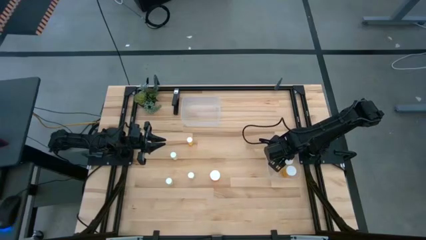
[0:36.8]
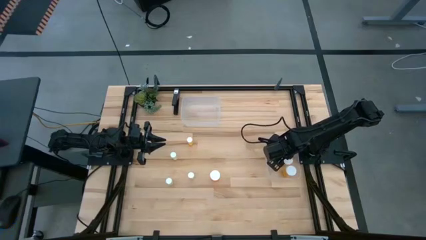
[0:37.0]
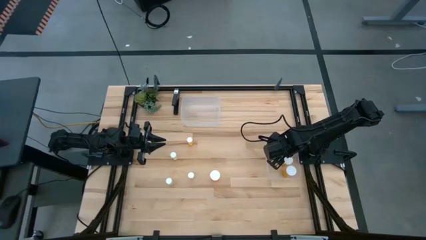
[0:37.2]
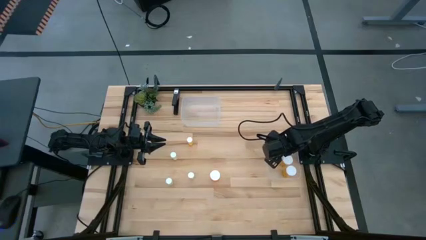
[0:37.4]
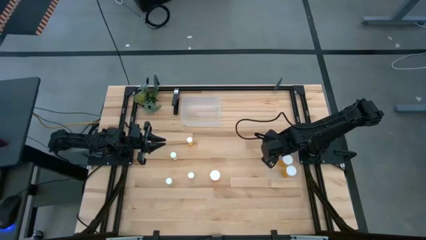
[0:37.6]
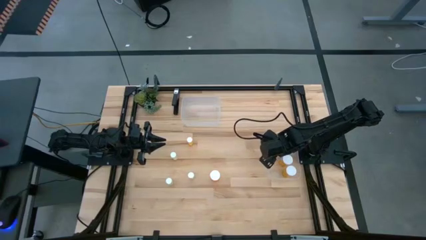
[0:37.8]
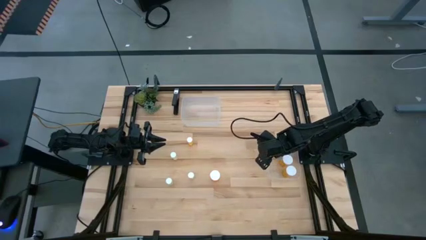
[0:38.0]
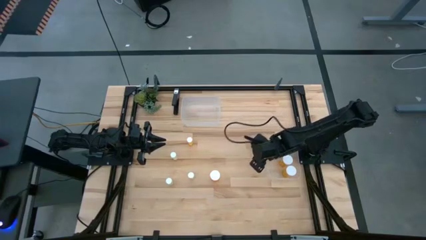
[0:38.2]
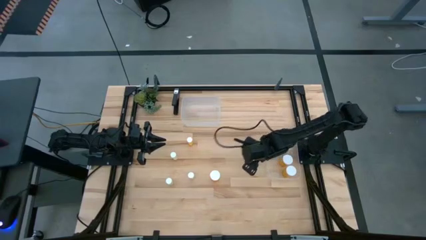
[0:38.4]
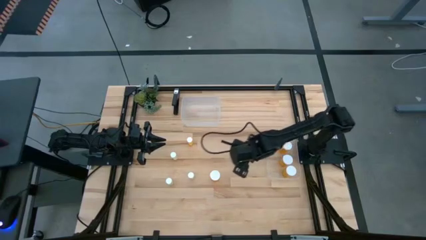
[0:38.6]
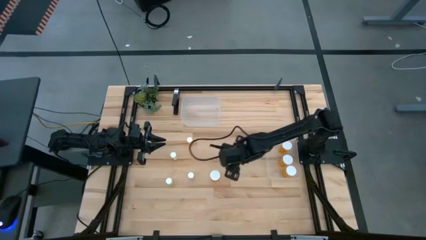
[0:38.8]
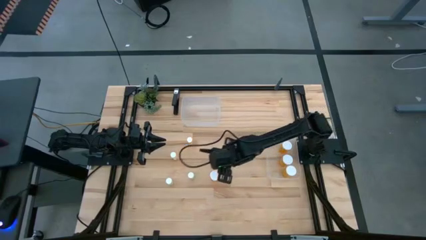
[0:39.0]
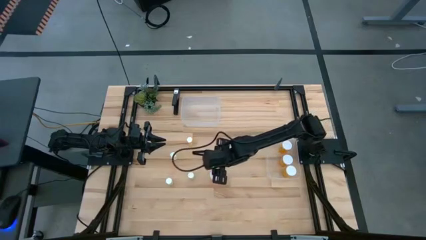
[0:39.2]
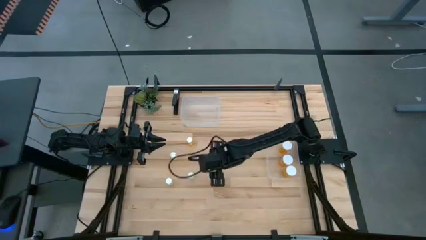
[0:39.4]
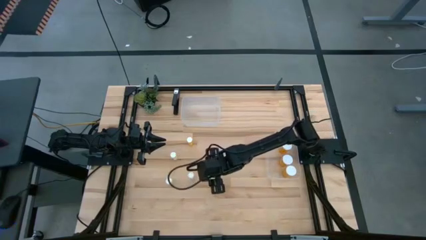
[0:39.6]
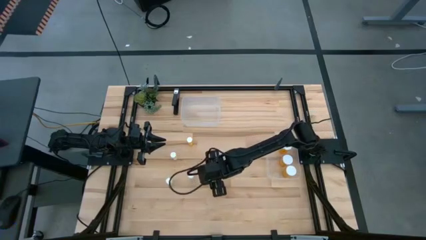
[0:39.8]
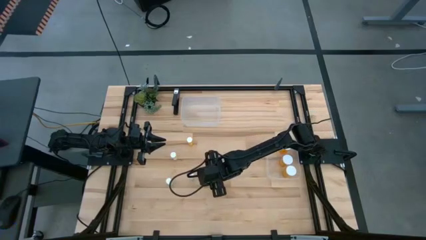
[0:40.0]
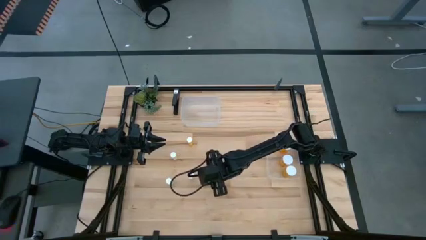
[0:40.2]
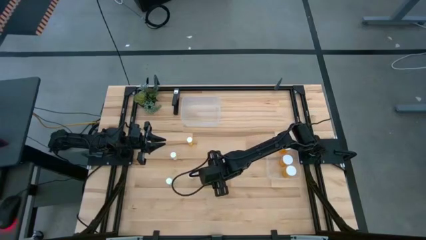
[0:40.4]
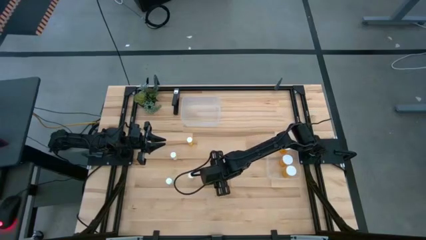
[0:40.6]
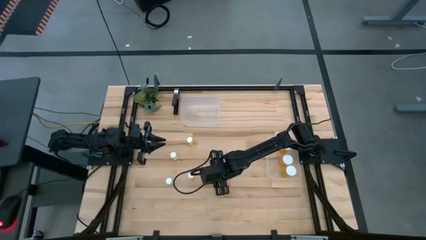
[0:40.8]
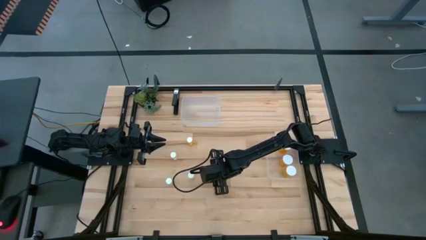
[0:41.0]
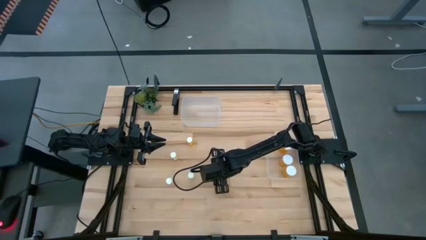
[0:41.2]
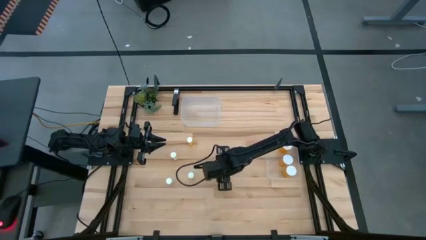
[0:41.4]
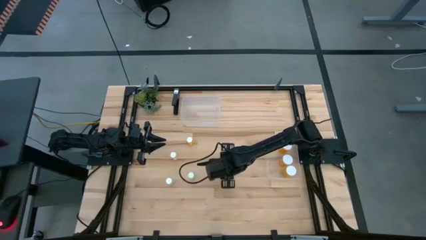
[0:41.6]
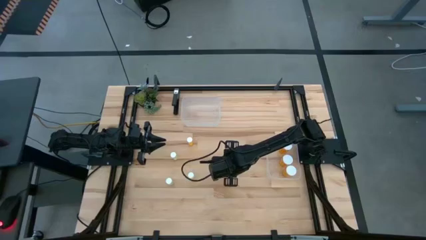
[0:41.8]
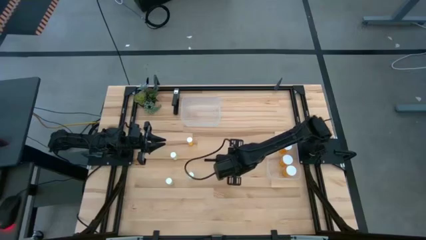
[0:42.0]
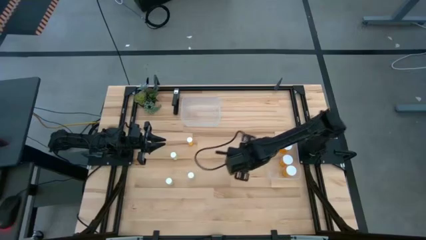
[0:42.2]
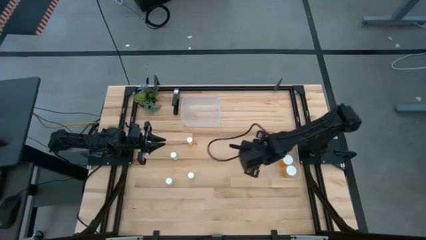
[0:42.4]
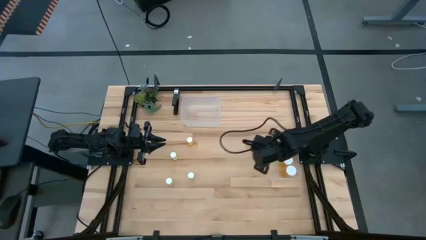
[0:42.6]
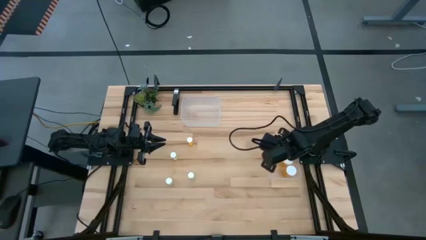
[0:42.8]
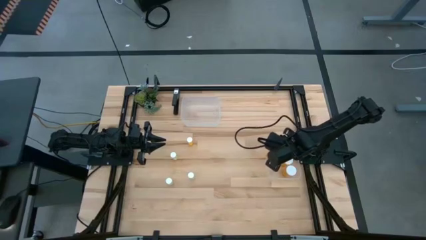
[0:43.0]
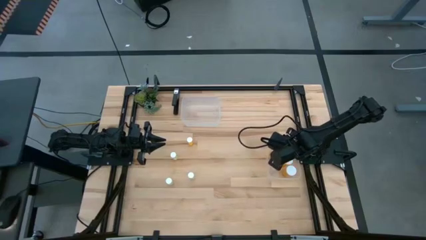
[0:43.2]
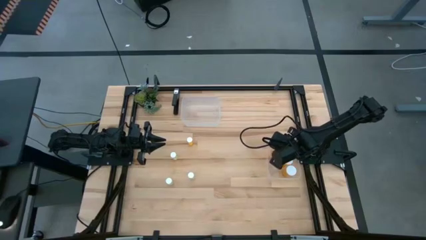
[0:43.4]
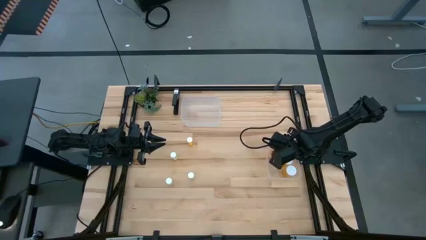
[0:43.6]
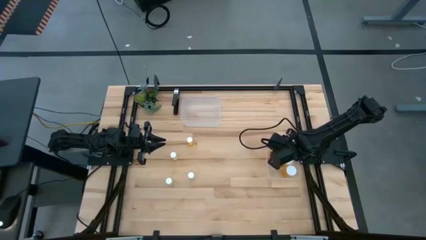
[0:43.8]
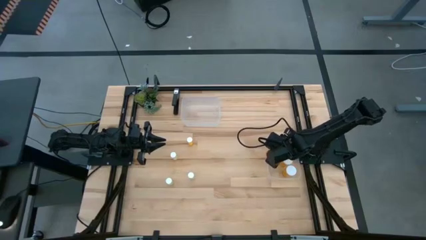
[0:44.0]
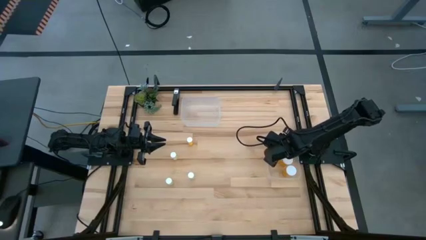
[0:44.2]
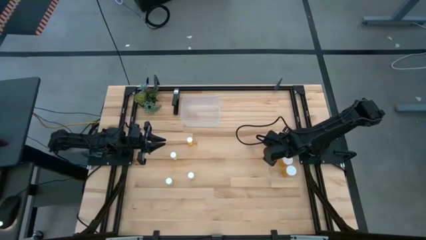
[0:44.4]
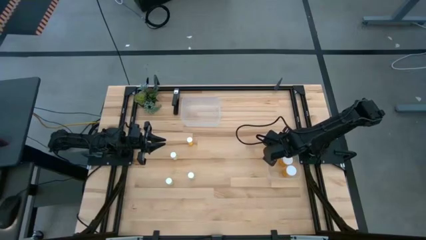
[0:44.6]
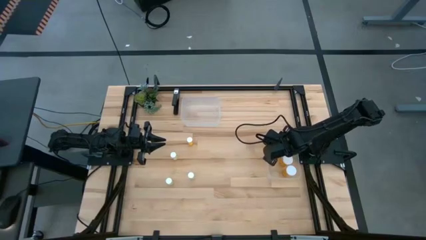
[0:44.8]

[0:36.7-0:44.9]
Task: Pick and place medicine bottles into bin by pill shape (circle, oval)
Put the large orange pill bottle into the bottom transparent bin

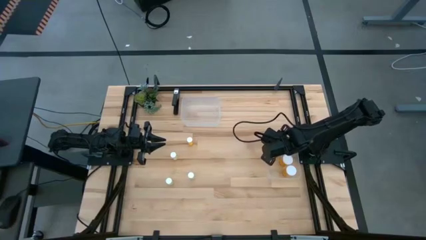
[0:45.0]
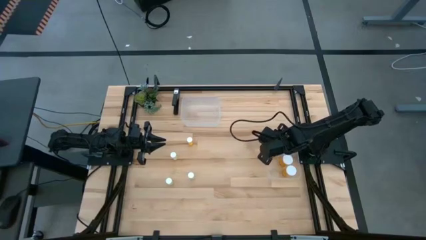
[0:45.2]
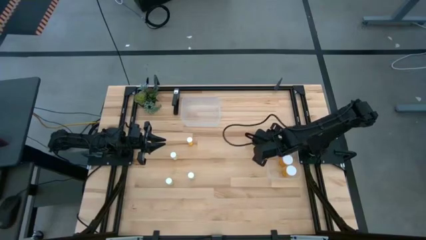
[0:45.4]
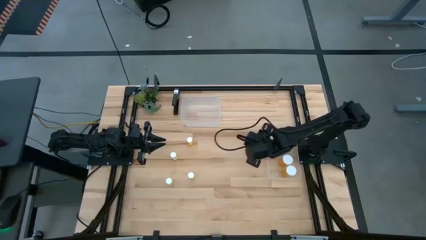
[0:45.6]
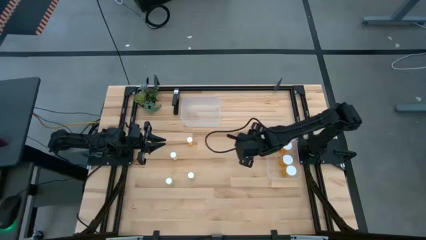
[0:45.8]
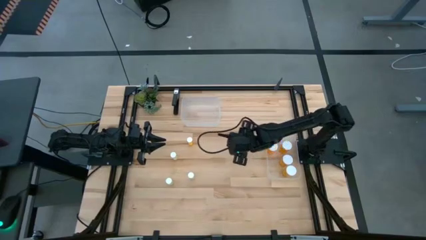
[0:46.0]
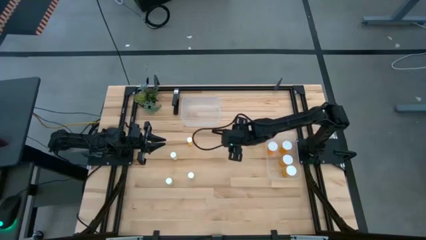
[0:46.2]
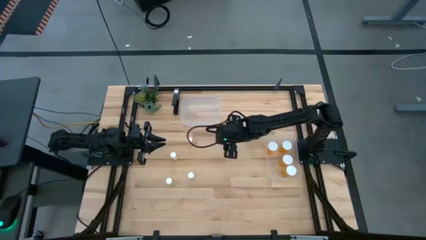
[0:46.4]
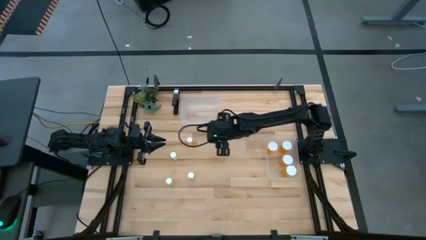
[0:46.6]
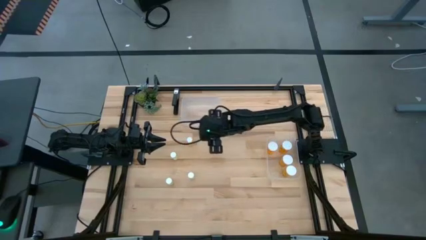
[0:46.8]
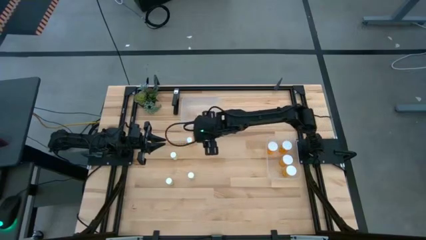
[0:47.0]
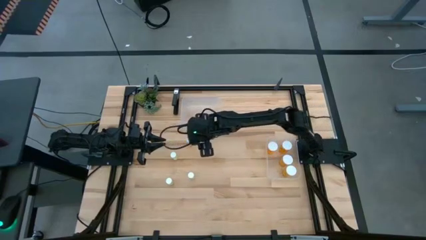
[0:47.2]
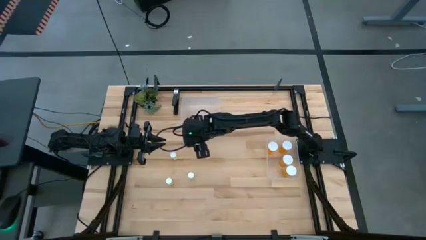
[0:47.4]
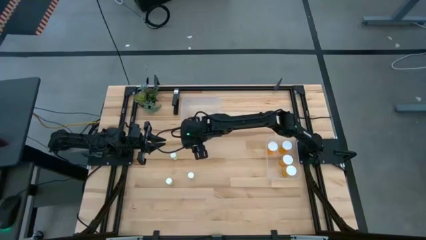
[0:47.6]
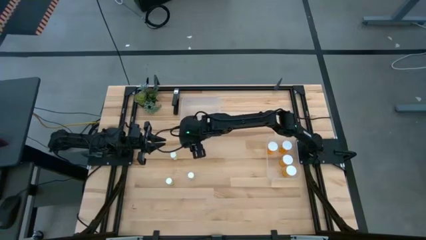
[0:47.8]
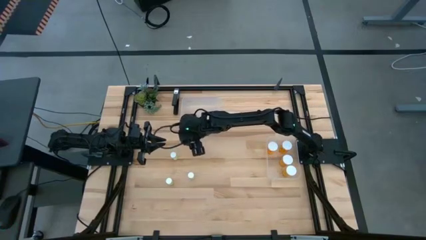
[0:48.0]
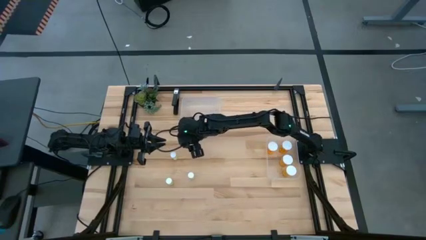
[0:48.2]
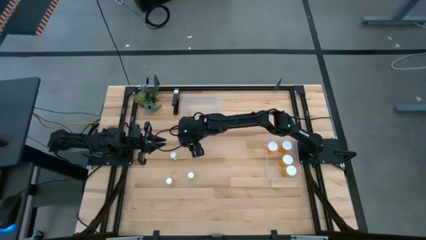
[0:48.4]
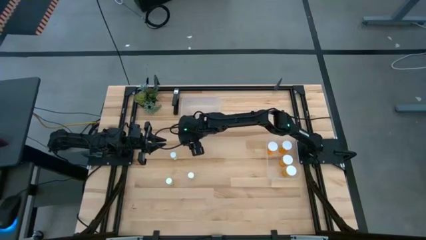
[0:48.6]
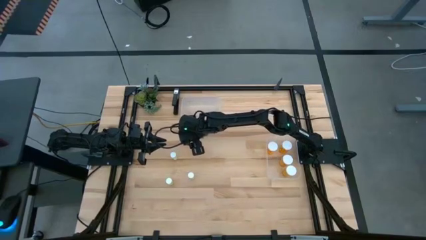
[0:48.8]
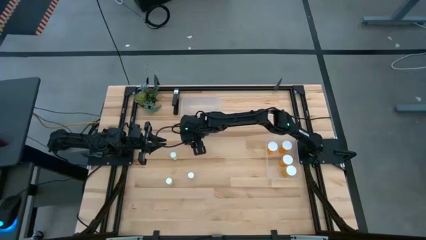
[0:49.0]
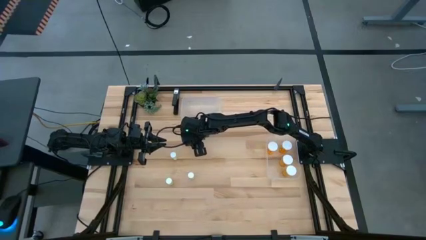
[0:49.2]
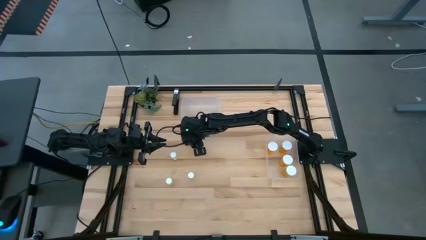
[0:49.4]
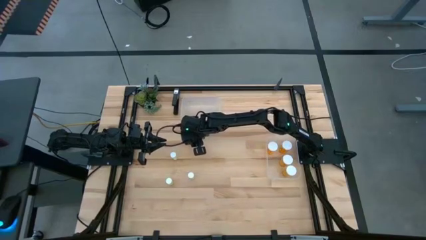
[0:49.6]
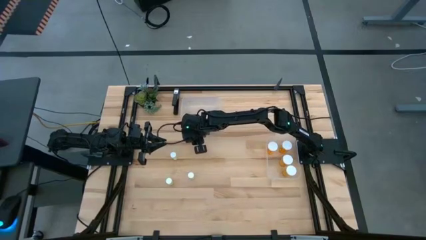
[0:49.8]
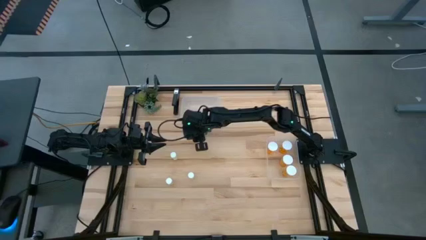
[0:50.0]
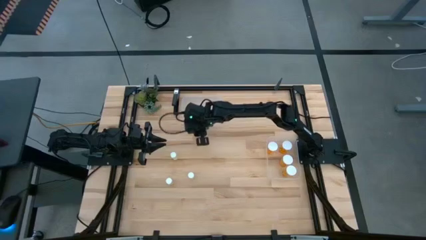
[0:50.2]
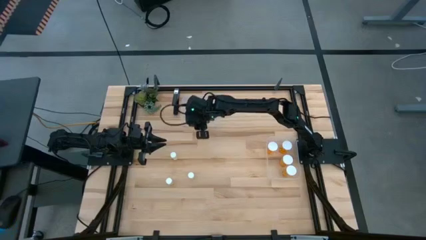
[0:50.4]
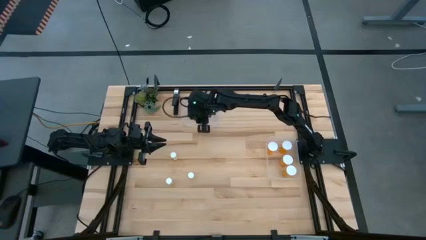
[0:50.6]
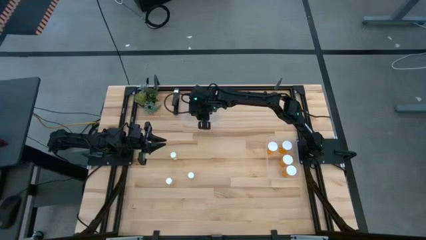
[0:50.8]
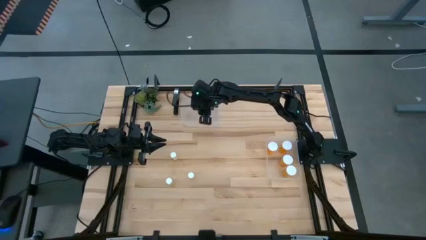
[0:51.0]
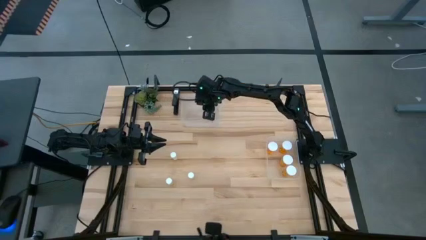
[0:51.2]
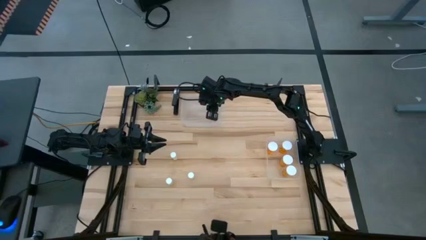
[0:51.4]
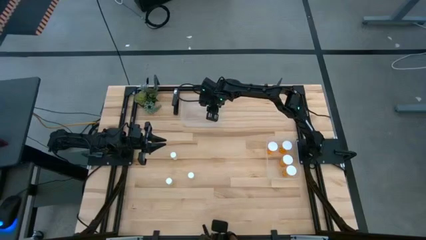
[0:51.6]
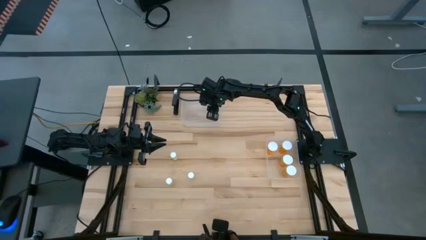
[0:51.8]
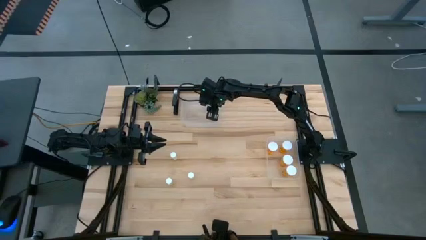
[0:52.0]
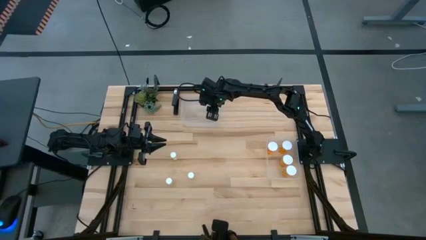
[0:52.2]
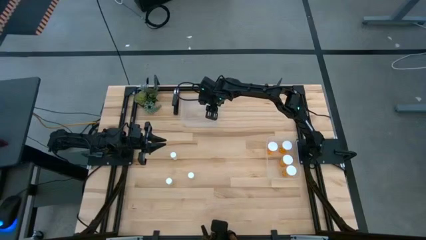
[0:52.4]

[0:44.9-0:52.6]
Put the small orange pill bottle into the top transparent bin
